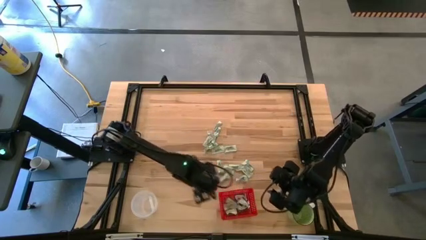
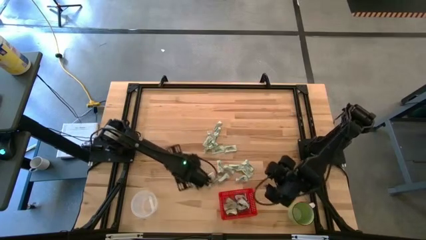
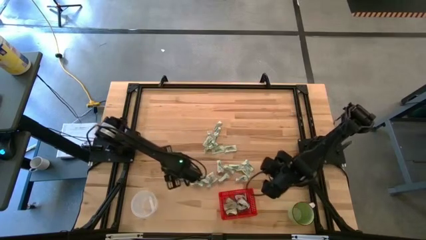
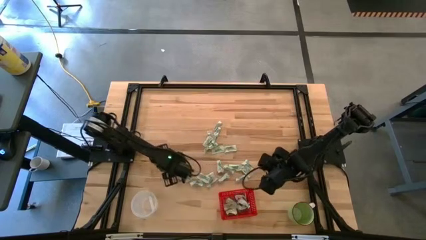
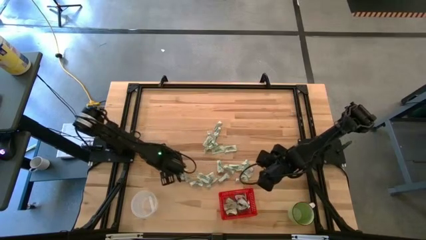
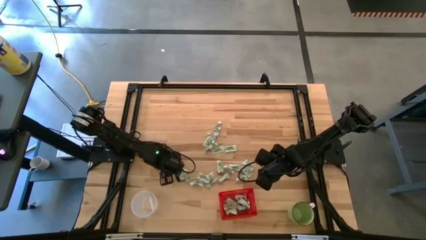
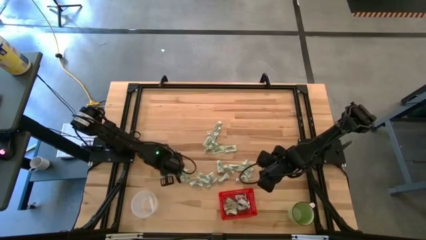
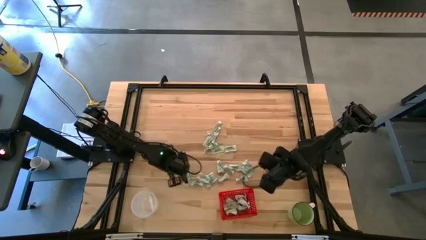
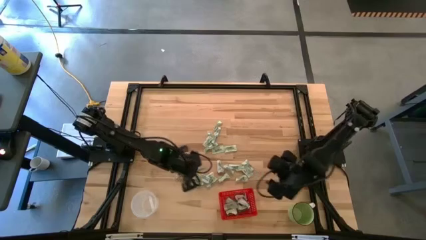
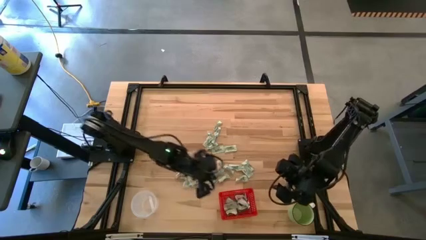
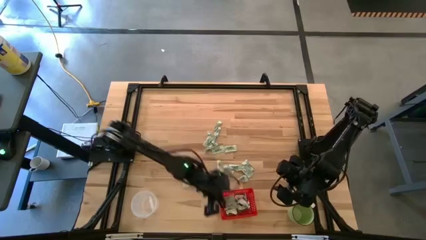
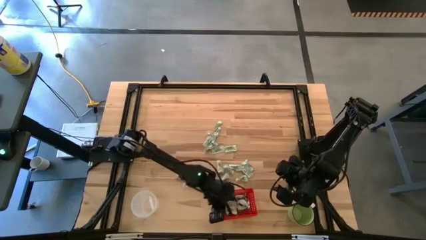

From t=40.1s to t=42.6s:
Task: Pick and place items into bin
Put the white stevia packet into the red bin

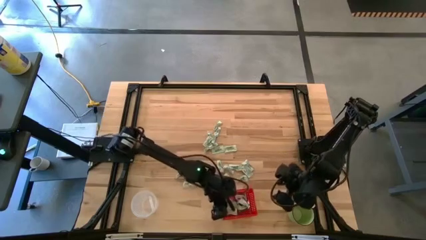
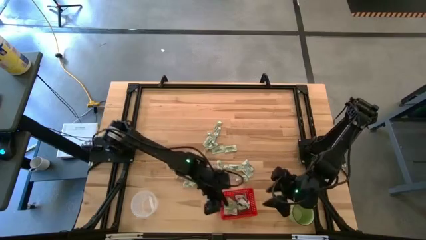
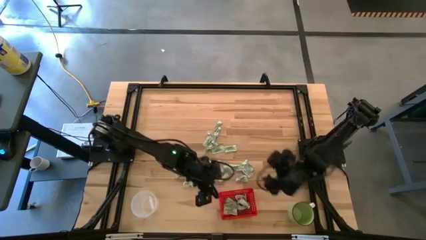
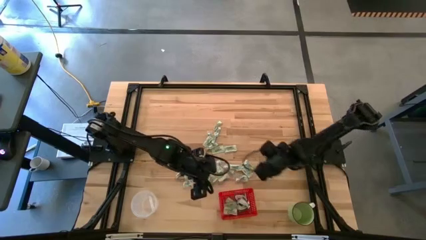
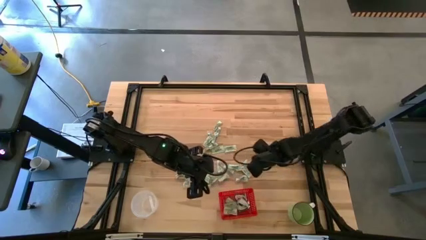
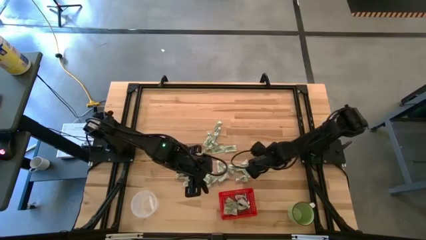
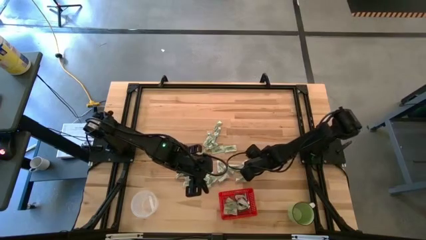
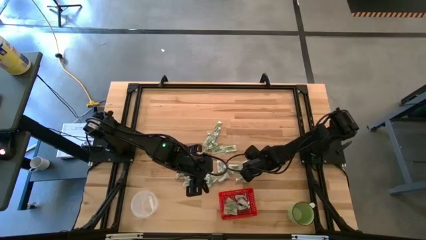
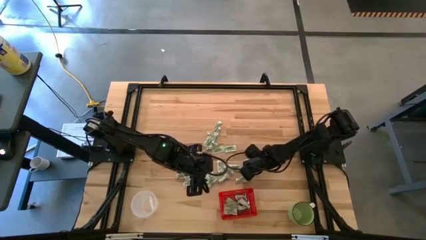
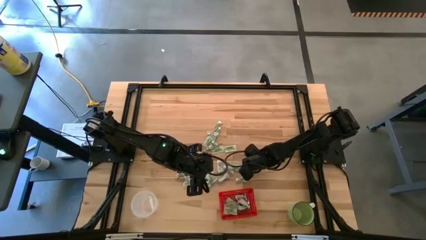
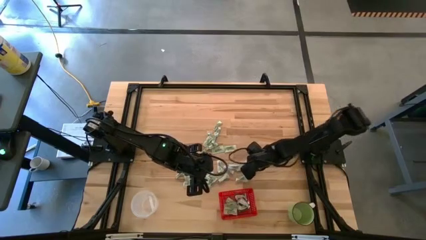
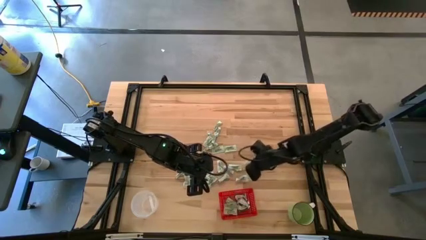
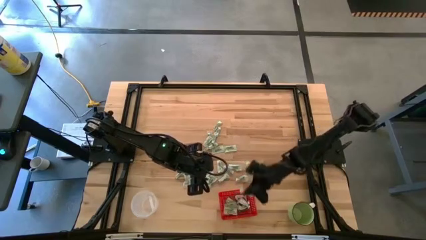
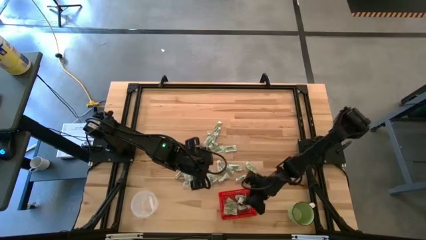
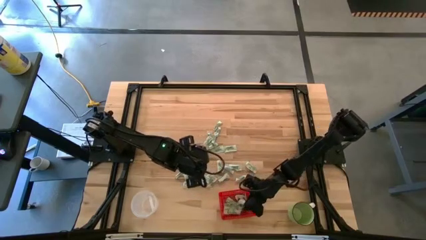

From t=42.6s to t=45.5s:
Put the white stevia packet into the red bin

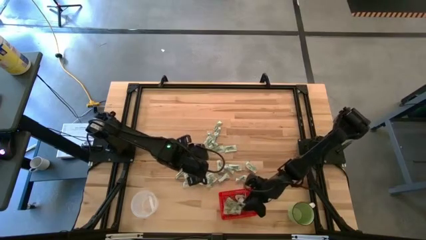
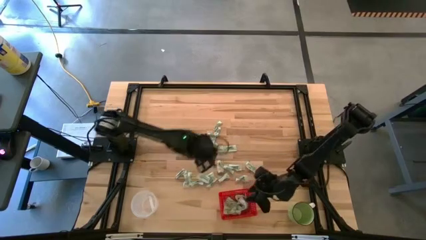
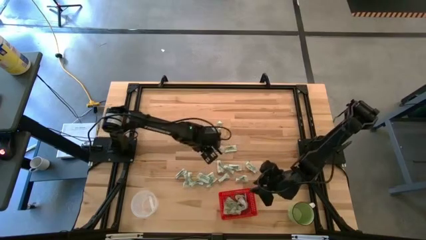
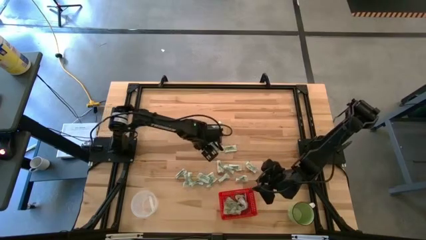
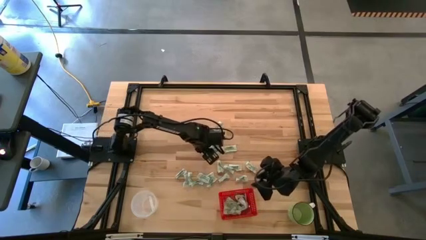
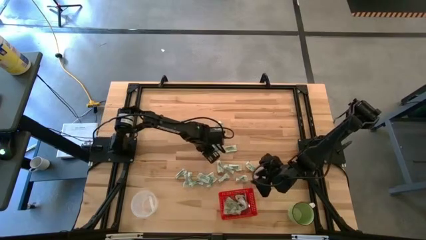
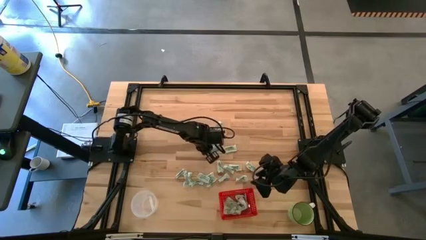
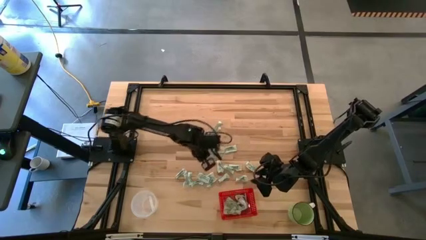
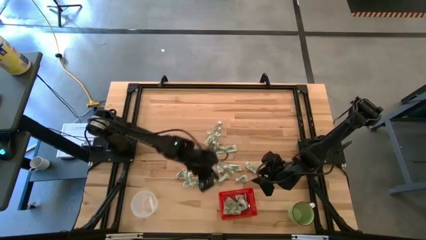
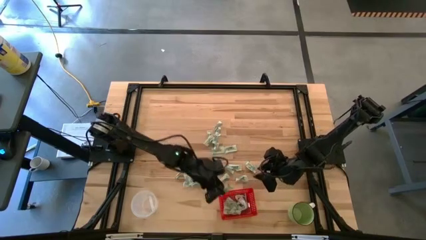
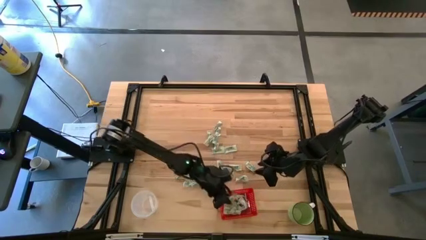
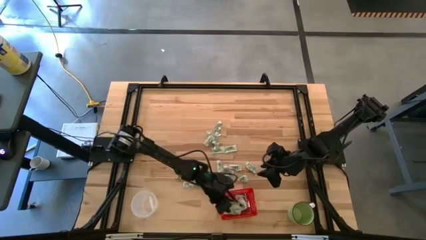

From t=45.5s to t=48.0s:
Put the white stevia packet into the red bin

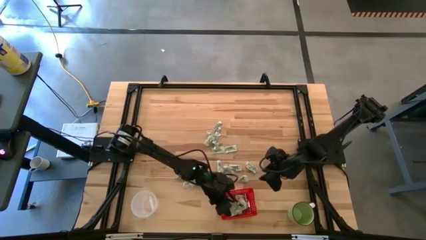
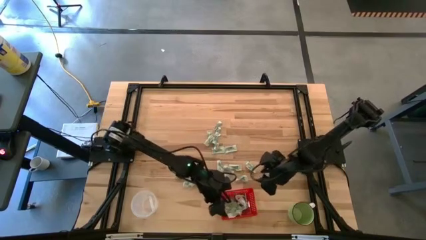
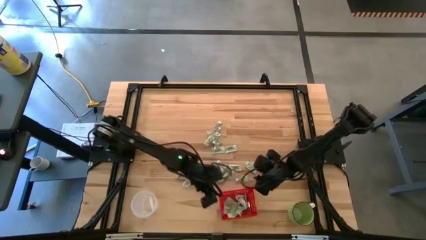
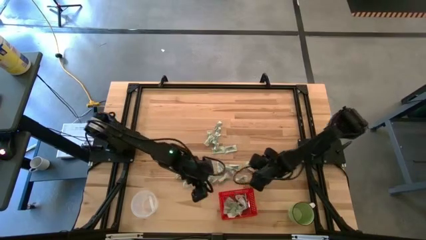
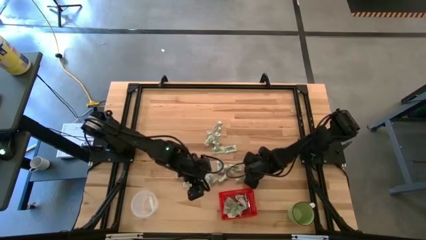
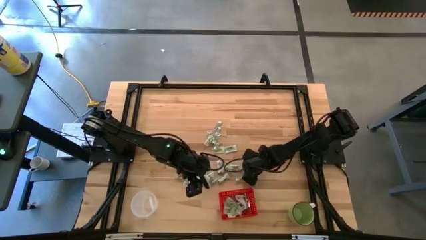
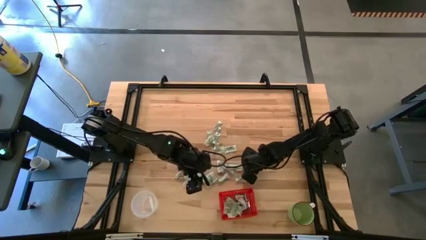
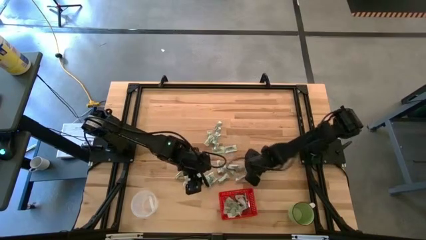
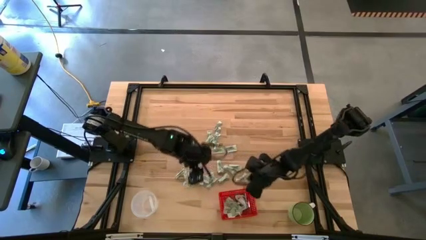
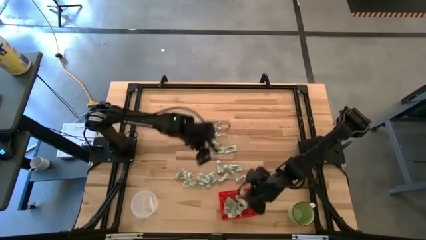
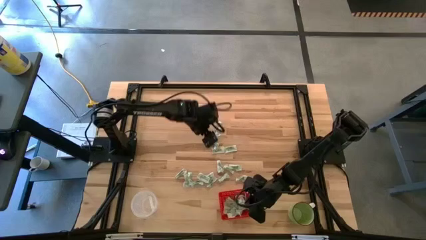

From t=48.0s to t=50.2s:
Put the white stevia packet into the red bin

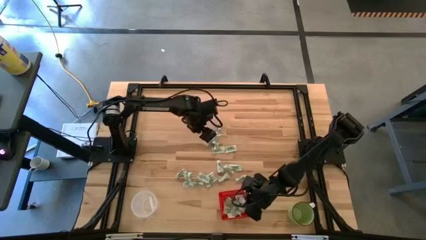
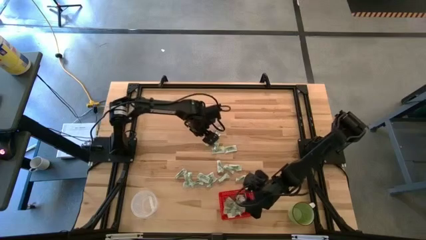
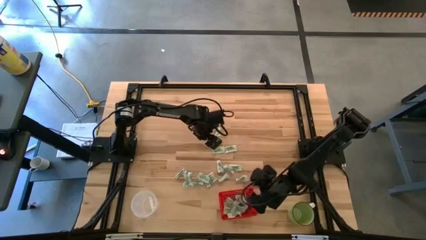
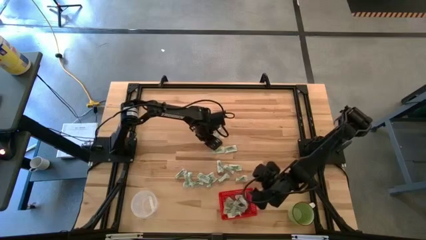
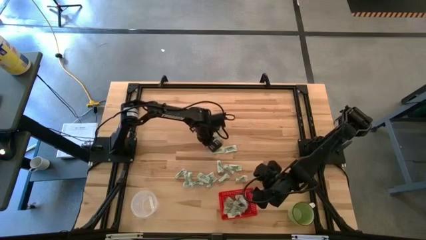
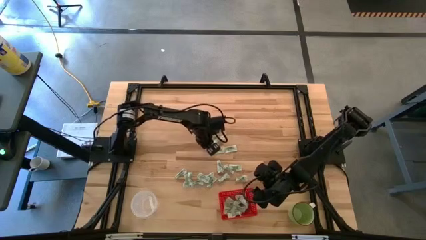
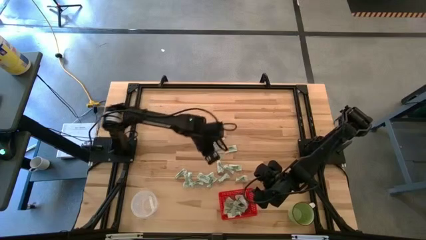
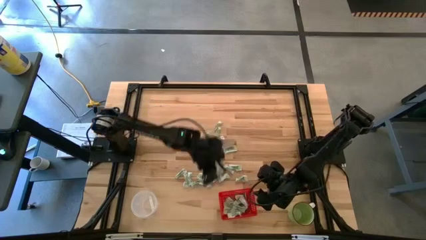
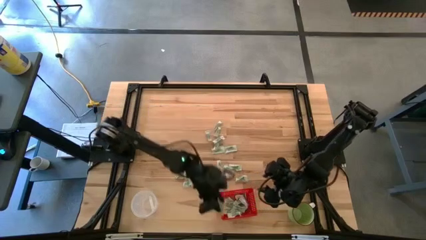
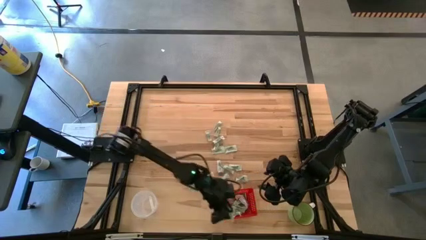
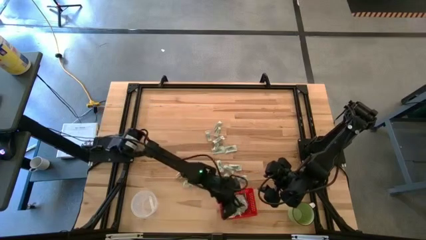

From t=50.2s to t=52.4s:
Put the white stevia packet into the red bin

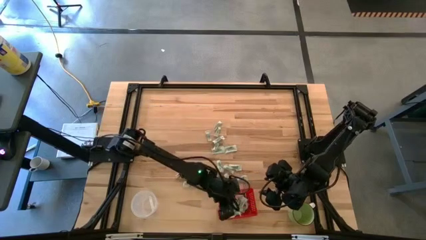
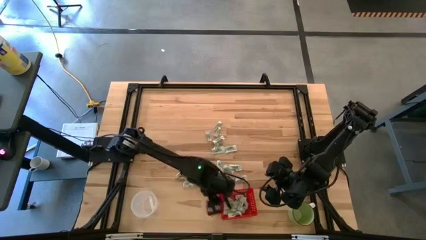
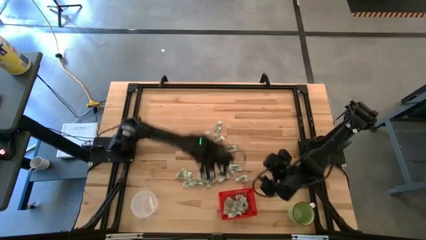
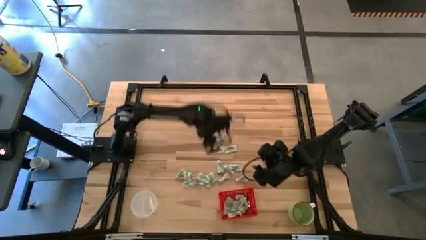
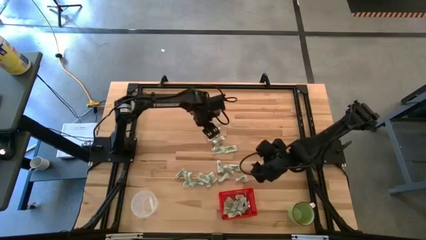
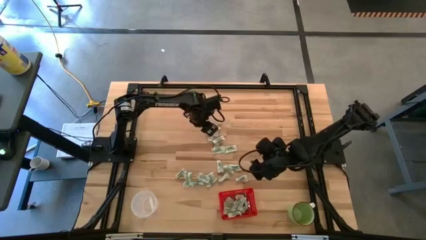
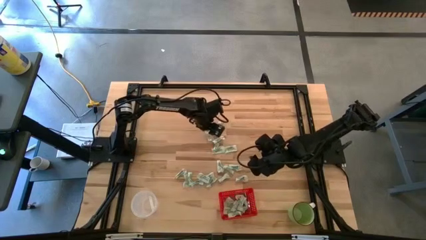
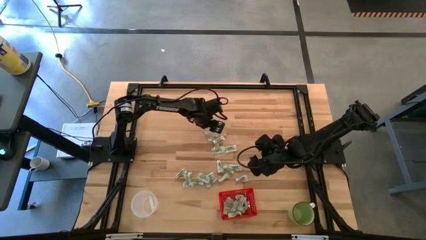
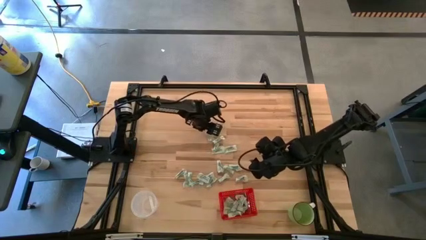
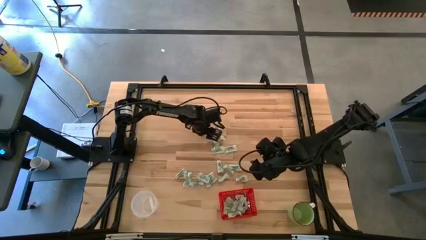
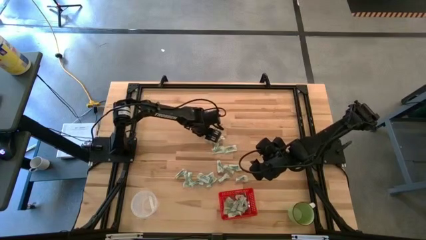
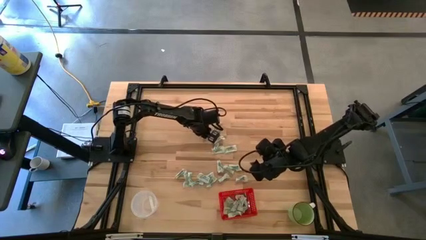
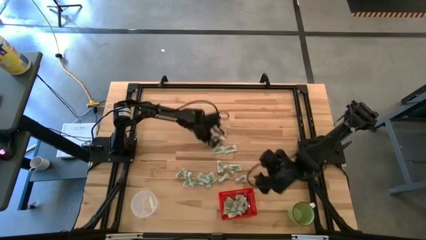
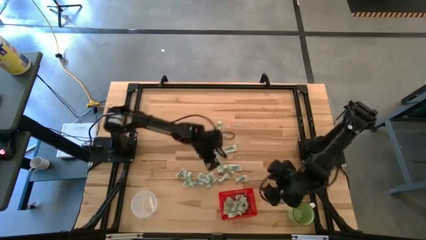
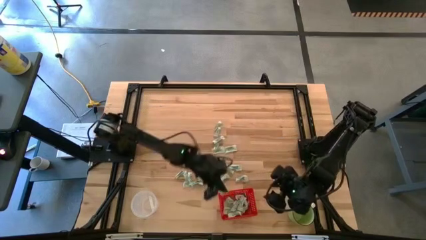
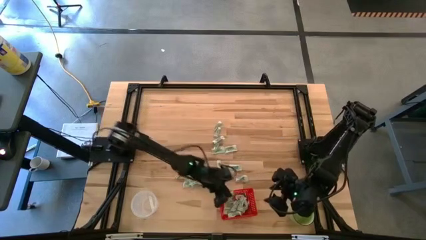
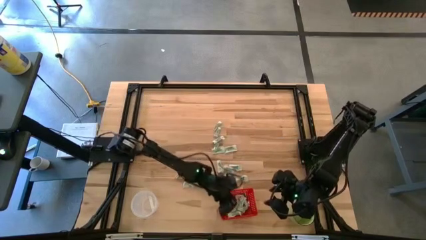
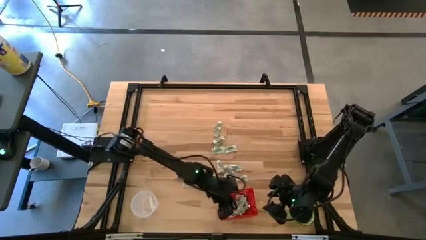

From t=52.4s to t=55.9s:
Put the white stevia packet into the red bin

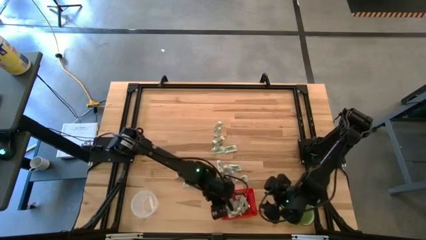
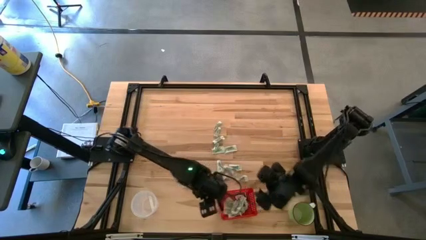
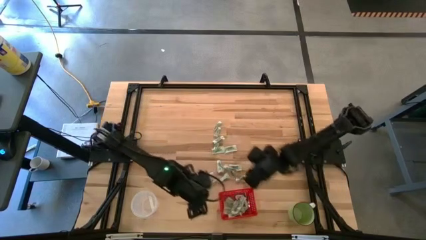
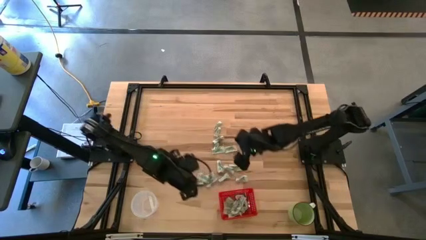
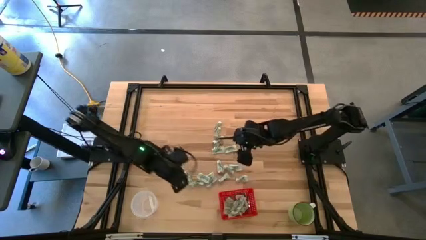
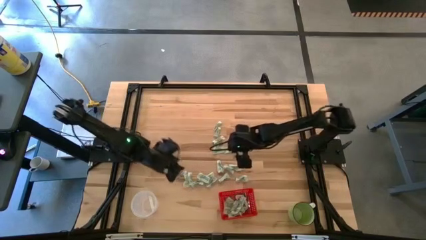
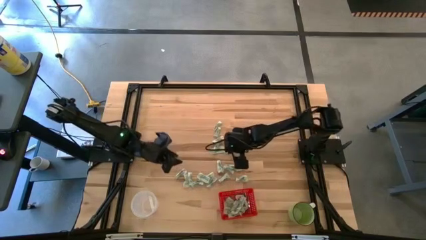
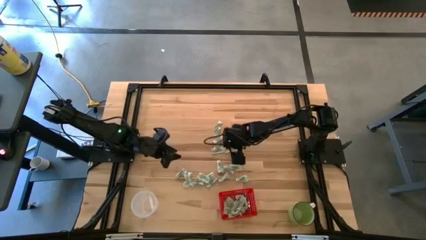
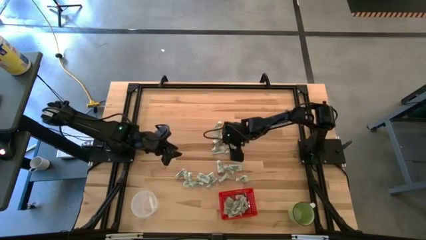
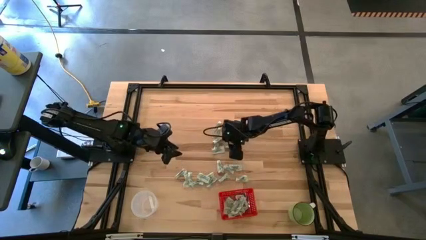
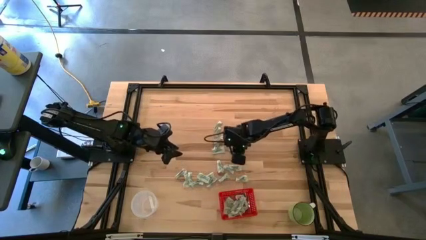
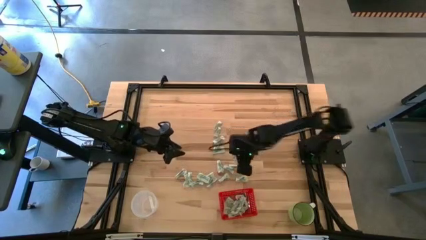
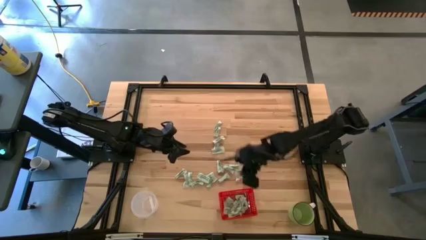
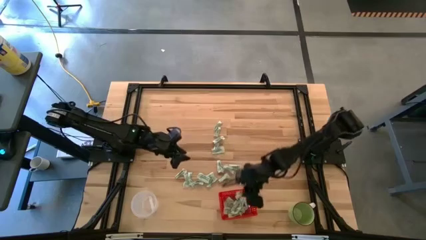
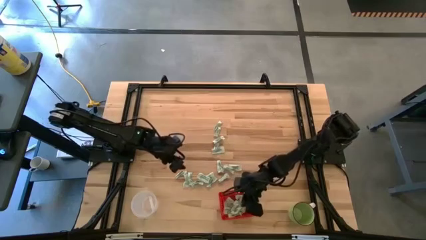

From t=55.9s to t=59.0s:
Put the white stevia packet into the red bin
